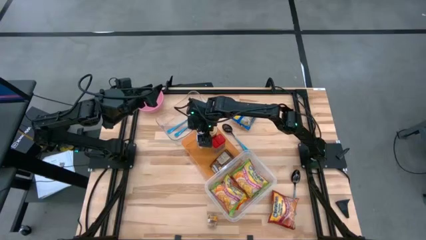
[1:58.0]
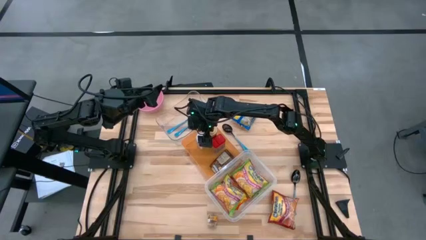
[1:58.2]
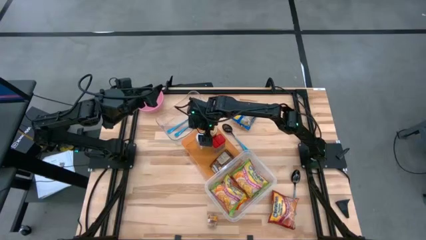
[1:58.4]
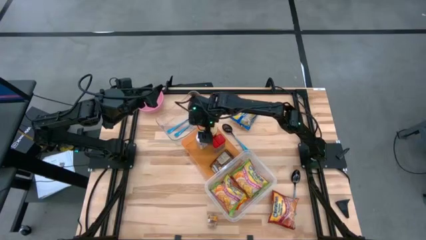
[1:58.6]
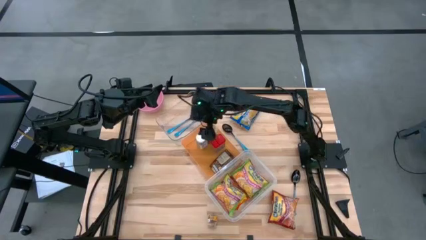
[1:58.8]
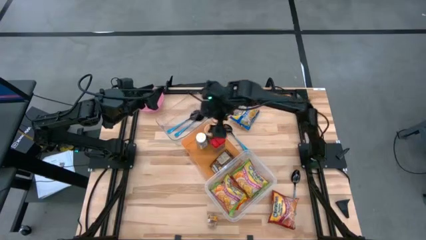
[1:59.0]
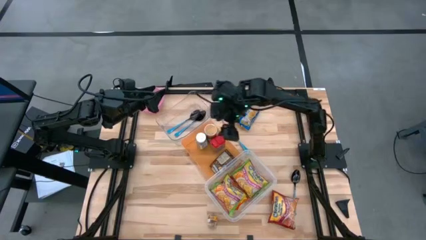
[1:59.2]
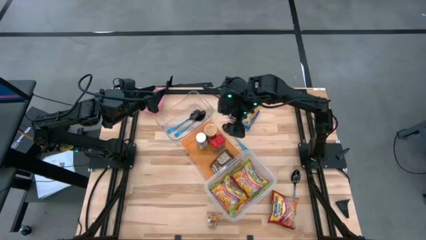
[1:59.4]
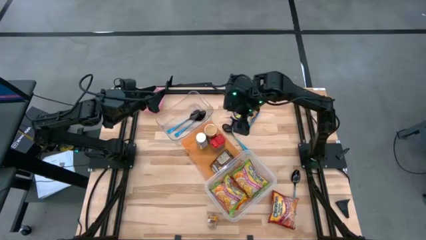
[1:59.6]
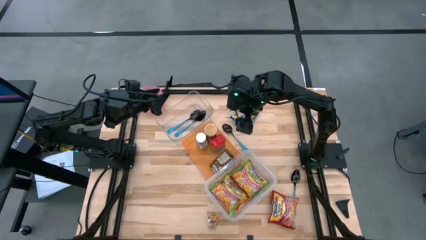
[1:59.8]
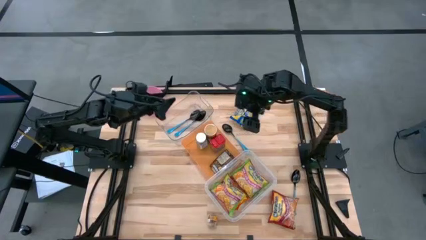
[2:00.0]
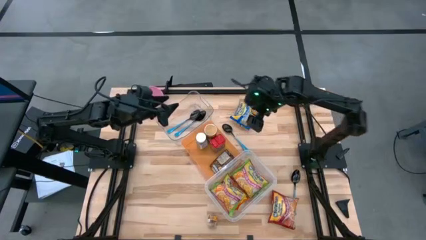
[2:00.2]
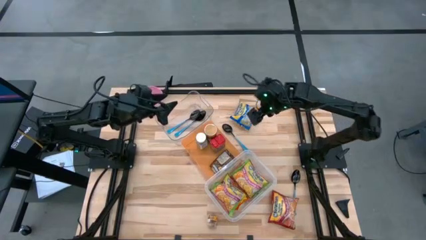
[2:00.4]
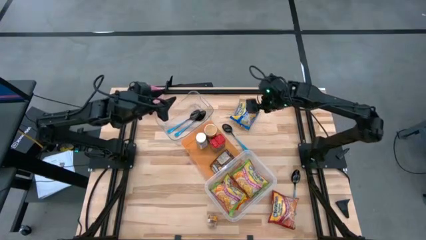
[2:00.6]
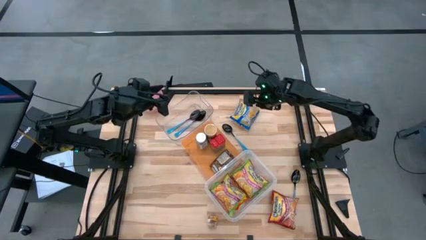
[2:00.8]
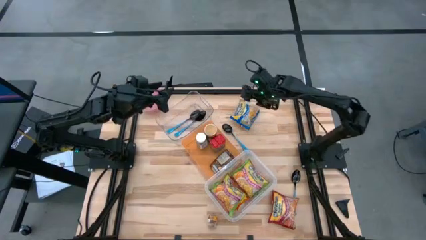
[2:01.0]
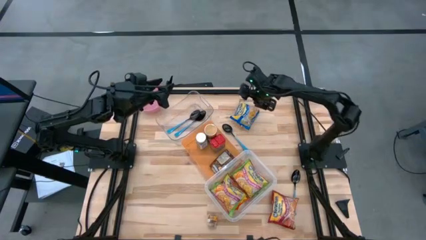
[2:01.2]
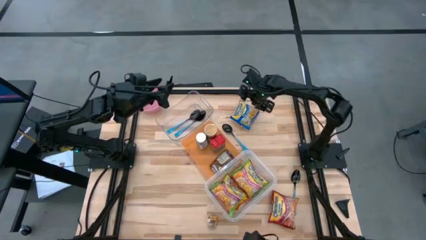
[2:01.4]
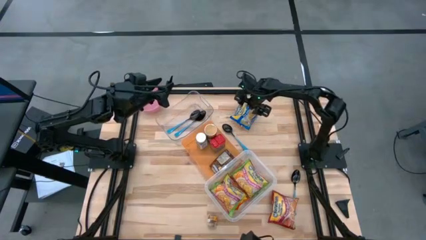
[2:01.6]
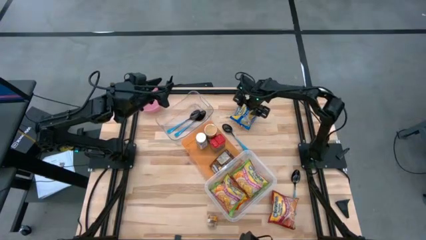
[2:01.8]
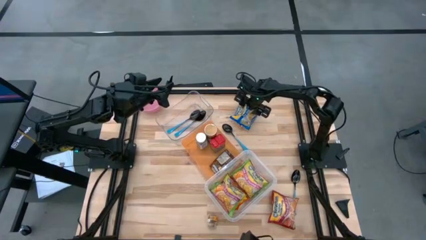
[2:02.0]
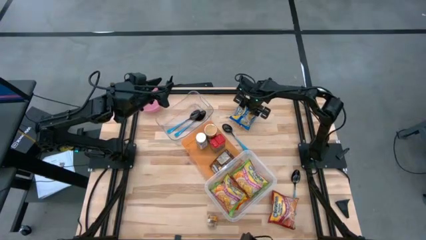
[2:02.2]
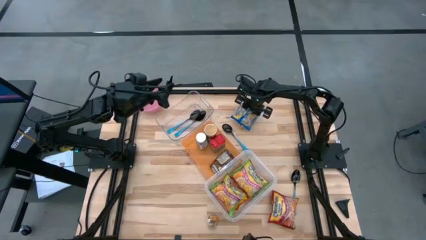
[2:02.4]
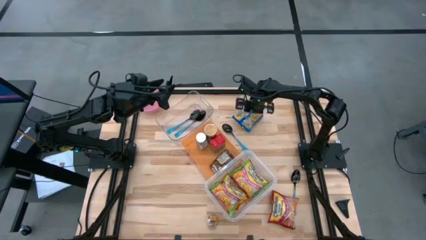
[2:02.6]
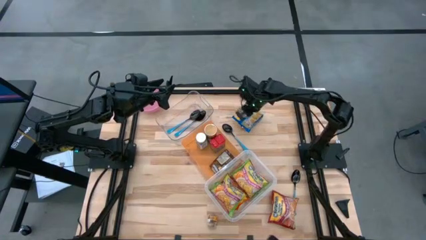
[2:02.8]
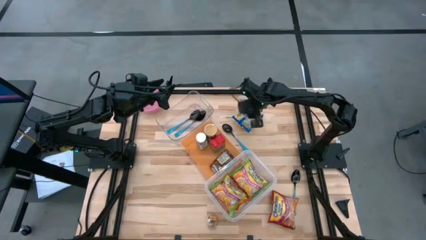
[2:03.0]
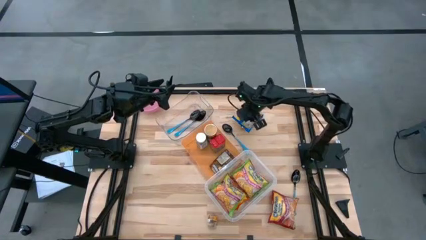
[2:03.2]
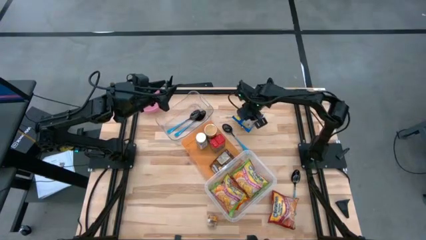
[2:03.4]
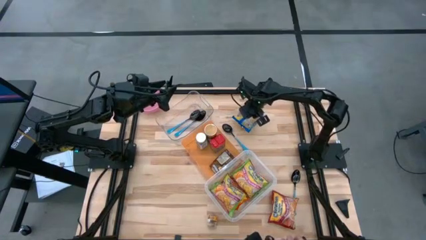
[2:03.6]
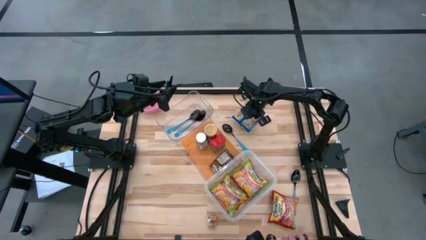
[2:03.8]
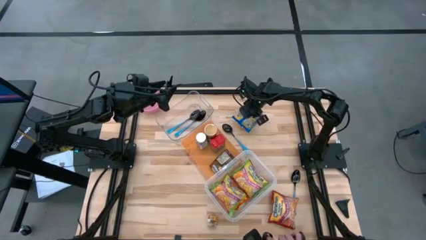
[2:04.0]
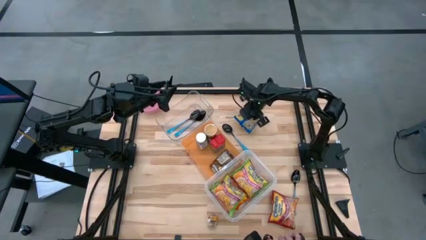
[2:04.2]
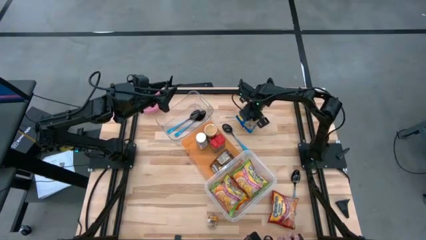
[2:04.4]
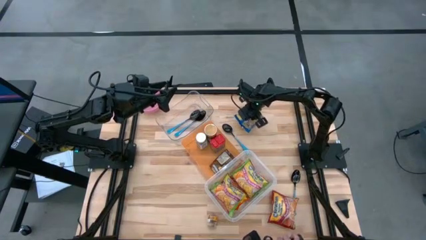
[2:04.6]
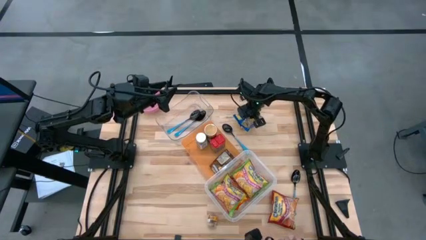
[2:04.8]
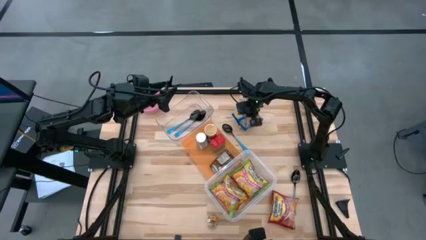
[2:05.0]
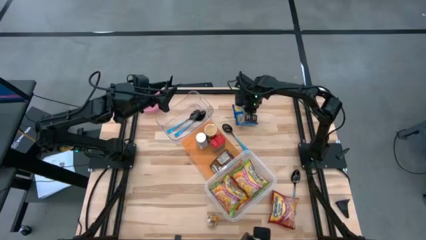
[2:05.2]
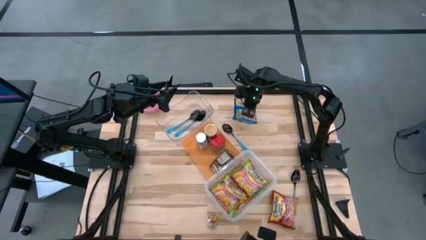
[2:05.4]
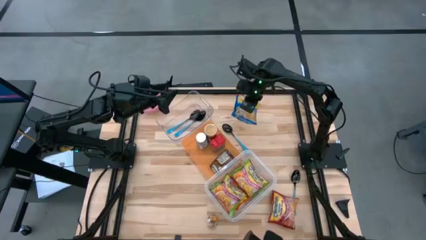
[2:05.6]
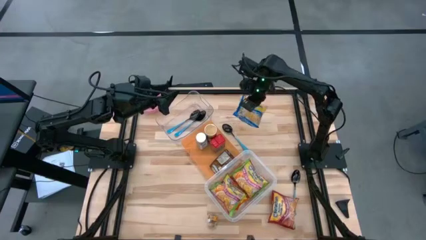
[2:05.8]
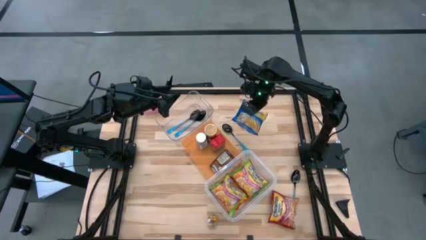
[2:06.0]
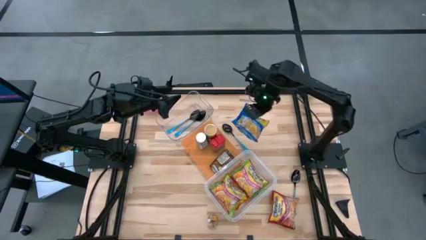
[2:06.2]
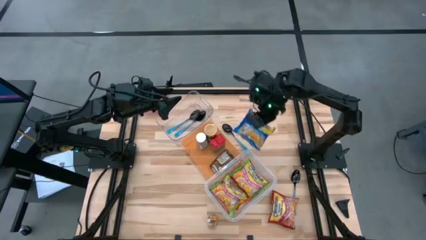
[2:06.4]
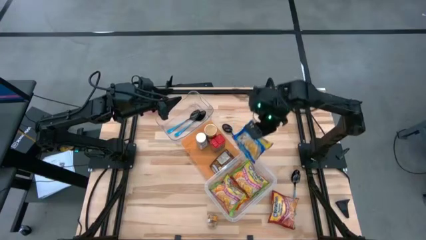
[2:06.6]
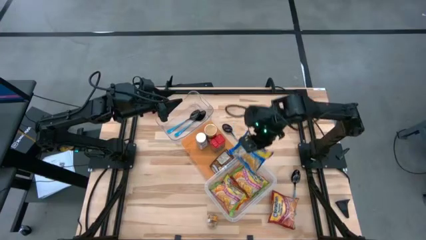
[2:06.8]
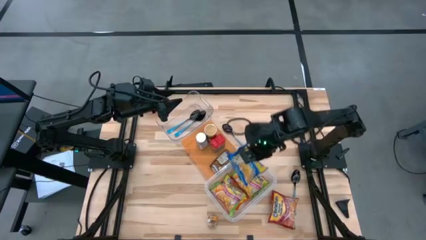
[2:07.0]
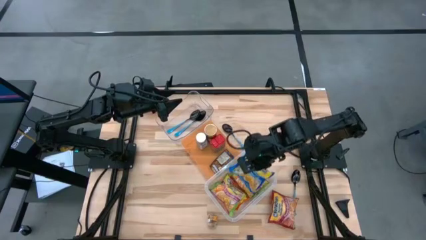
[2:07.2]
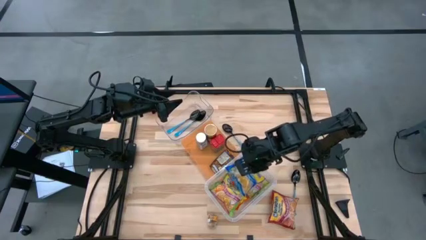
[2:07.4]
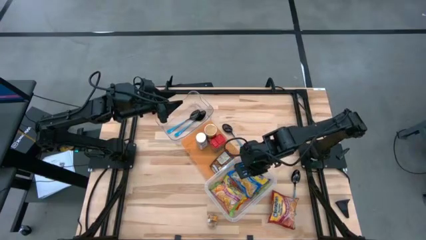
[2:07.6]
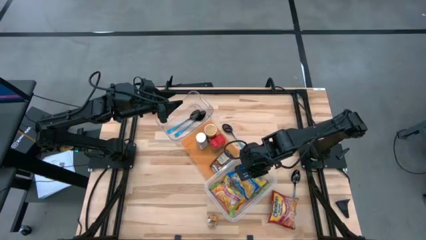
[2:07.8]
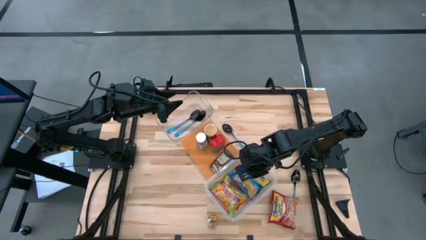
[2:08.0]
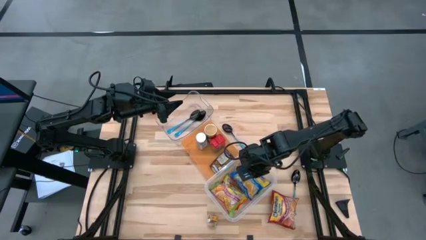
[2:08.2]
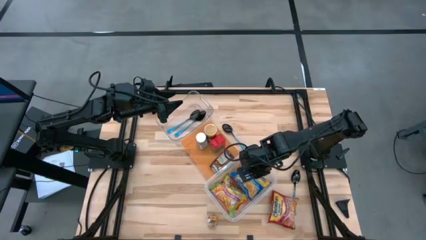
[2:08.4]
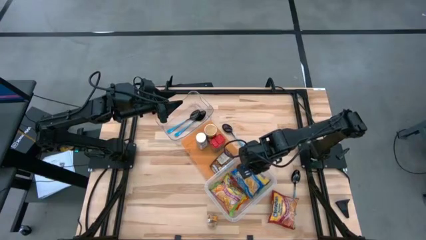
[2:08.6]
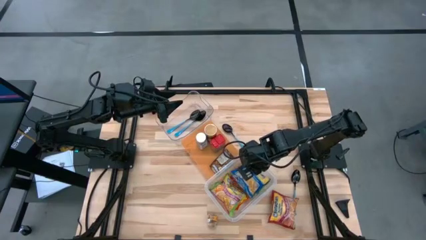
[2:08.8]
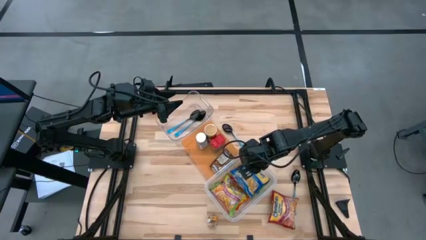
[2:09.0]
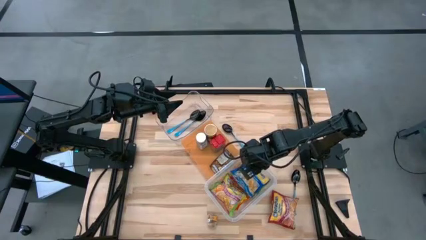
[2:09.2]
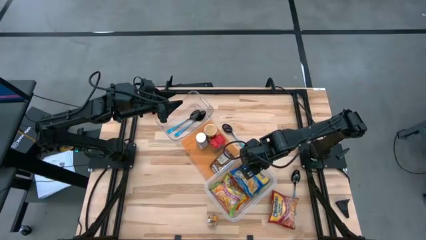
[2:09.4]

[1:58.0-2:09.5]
Task: Pick & Place Food Item
Put the blue noodle pack into the bottom transparent bin
